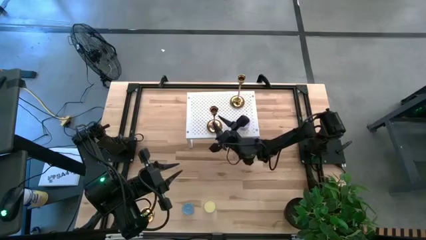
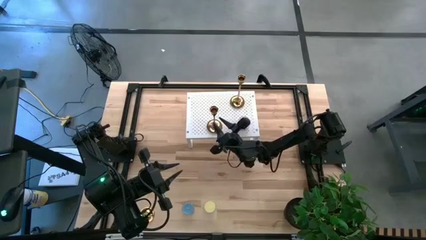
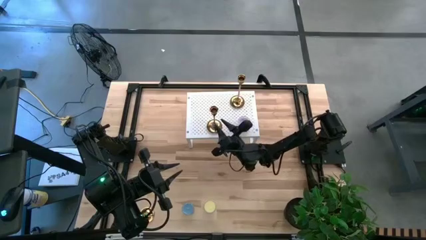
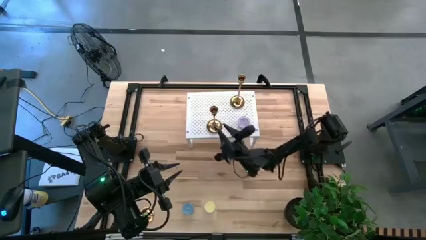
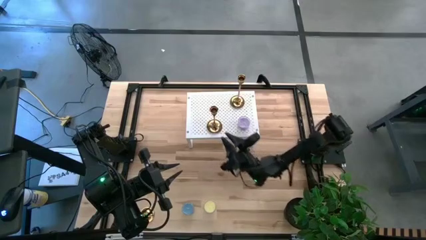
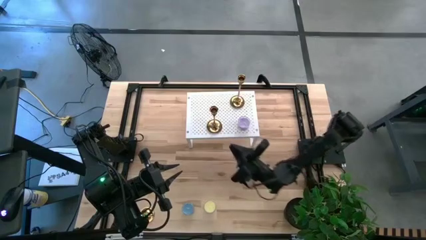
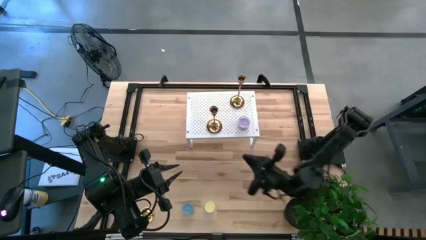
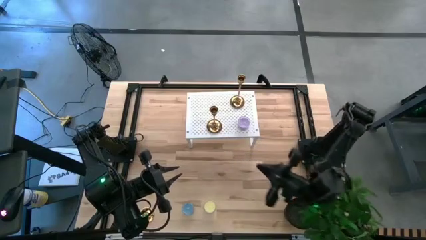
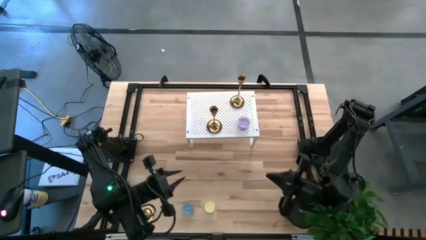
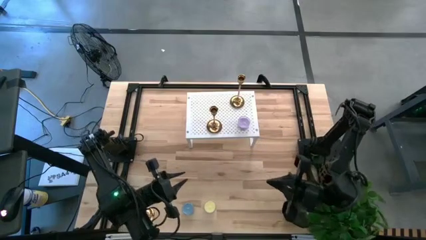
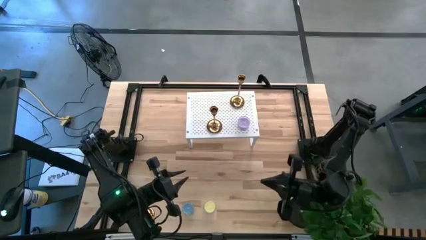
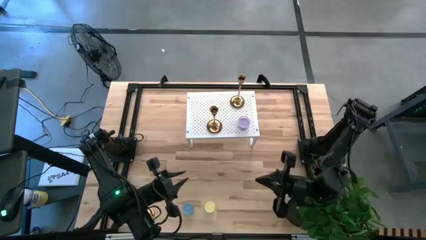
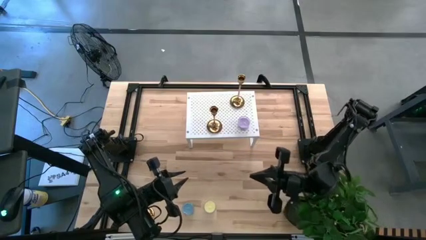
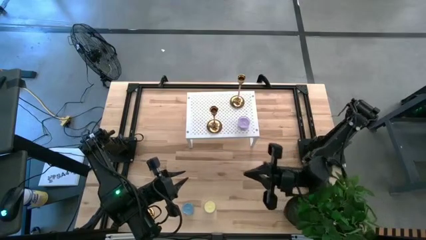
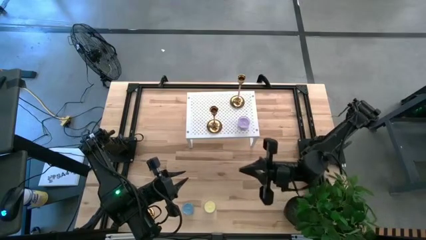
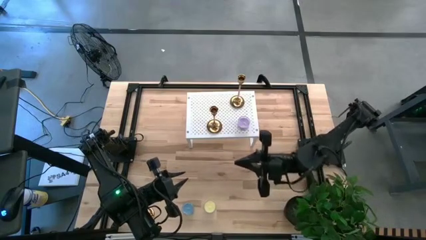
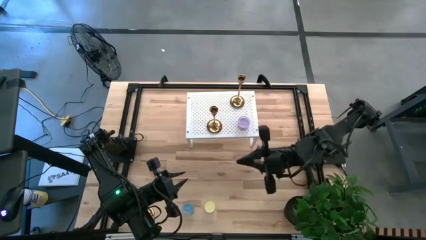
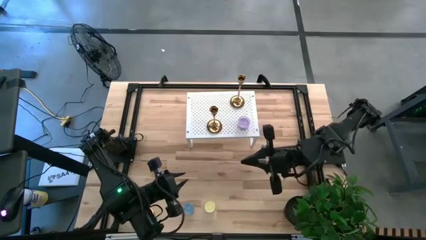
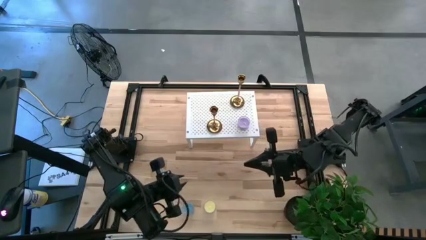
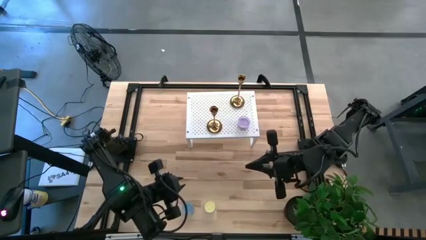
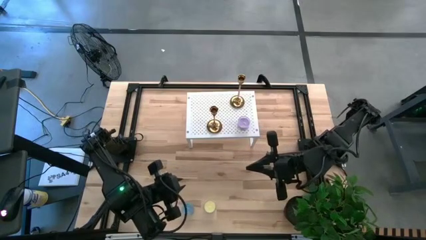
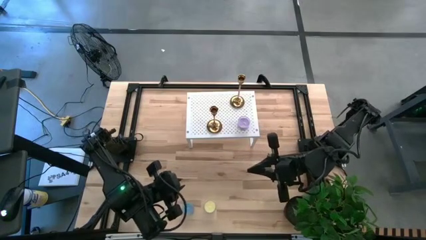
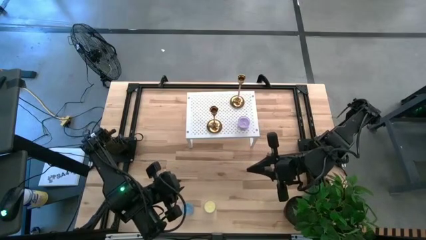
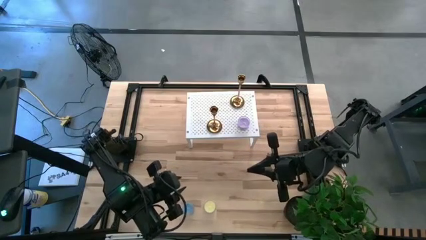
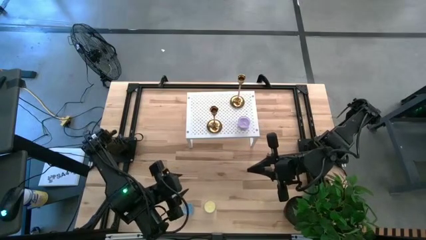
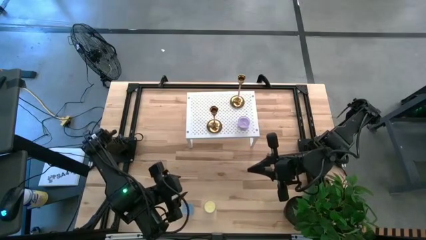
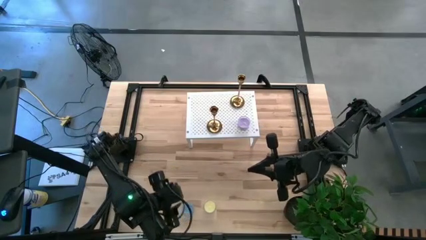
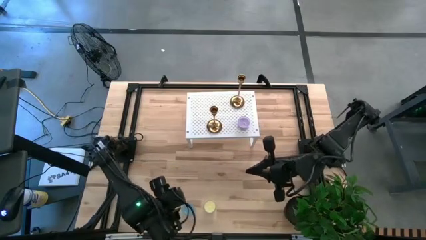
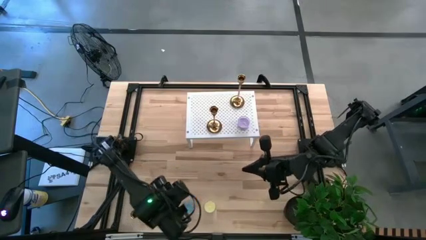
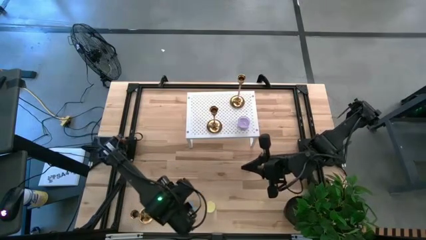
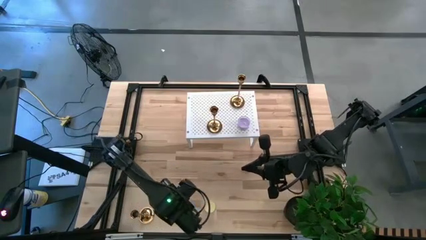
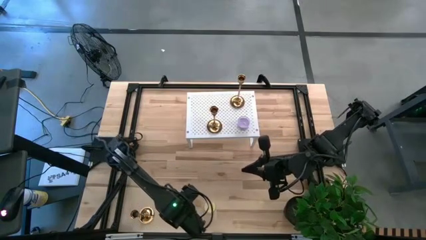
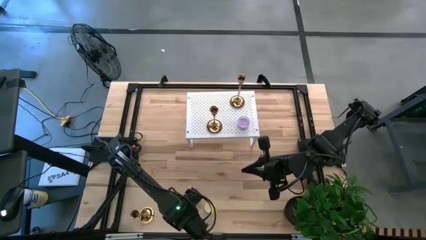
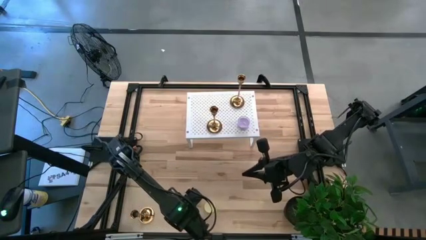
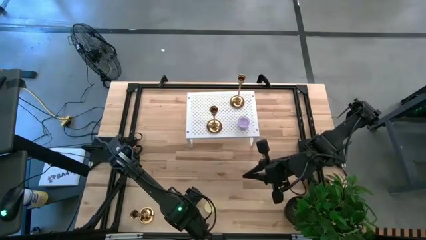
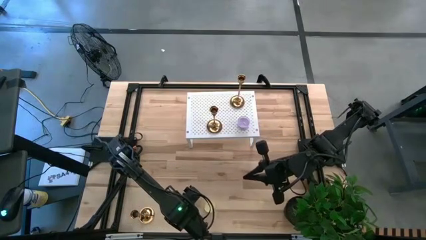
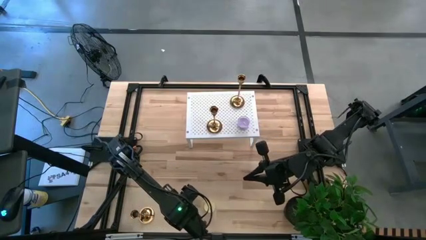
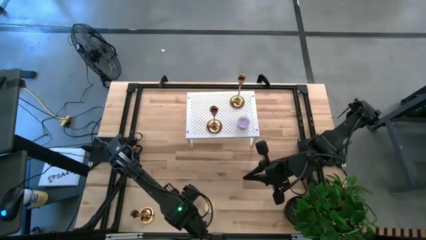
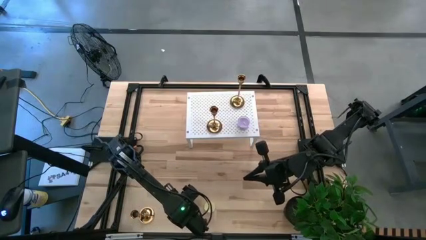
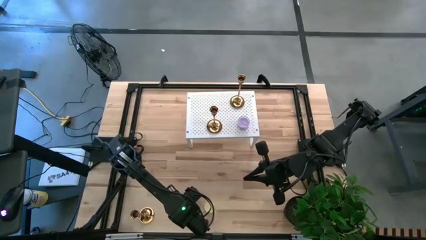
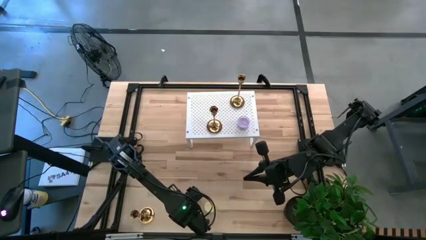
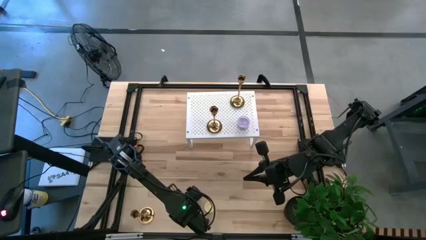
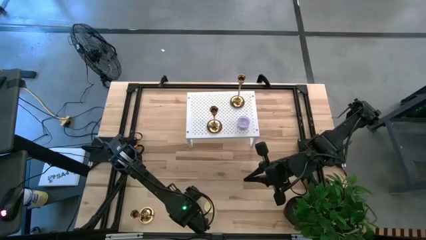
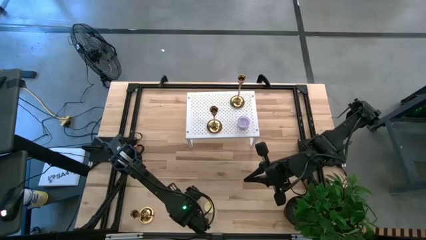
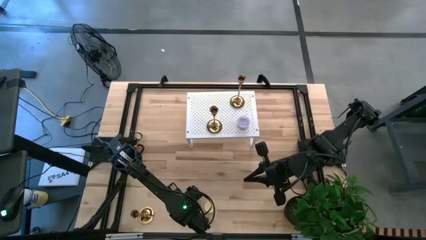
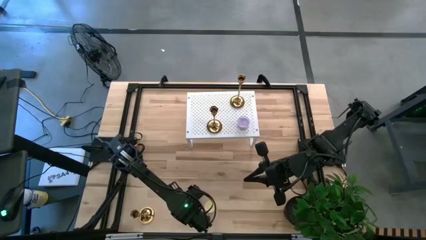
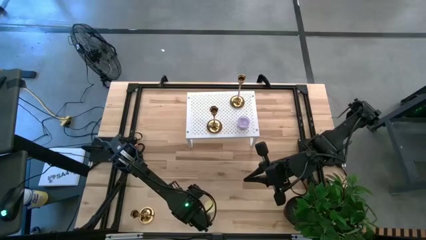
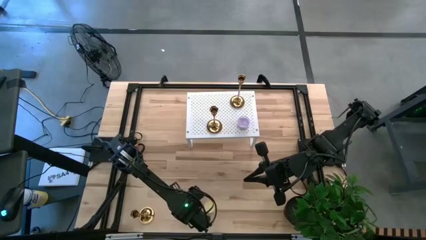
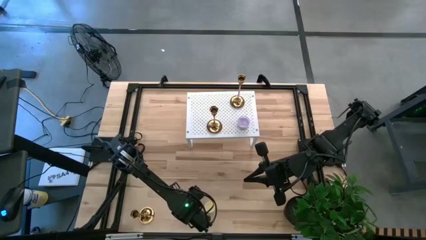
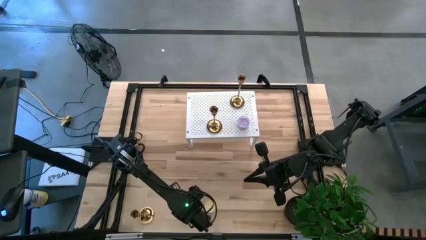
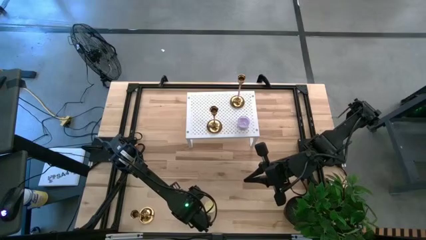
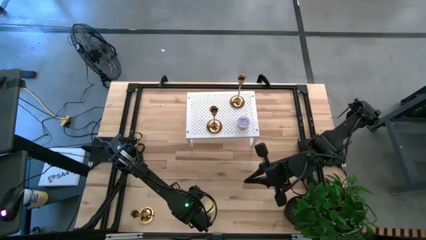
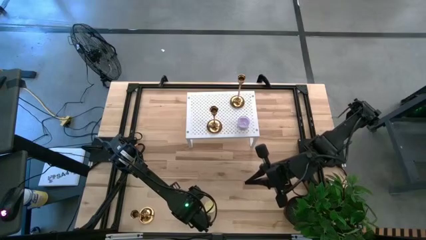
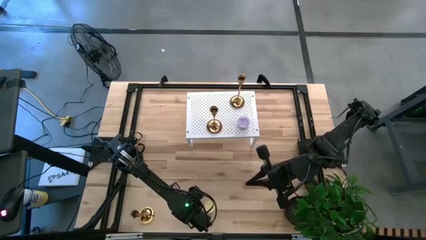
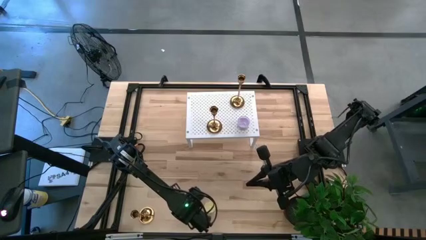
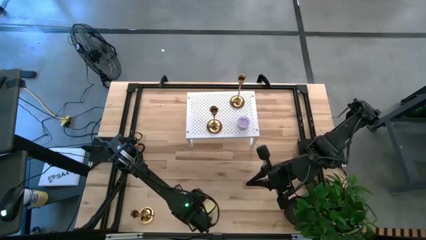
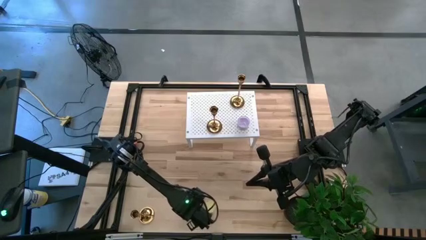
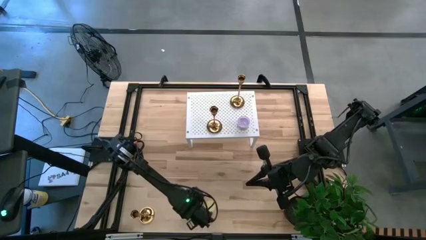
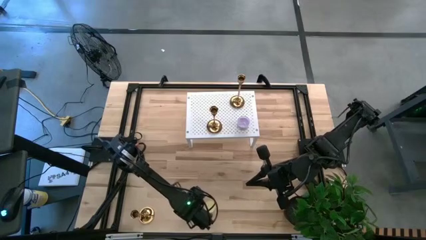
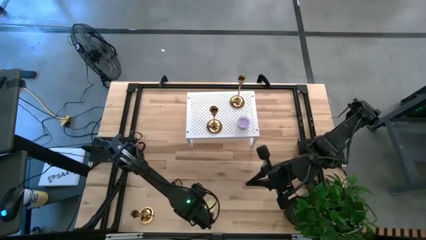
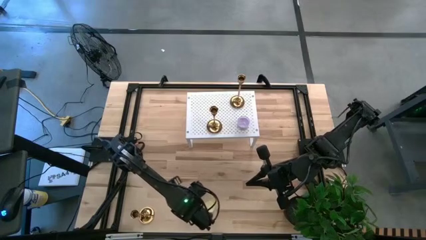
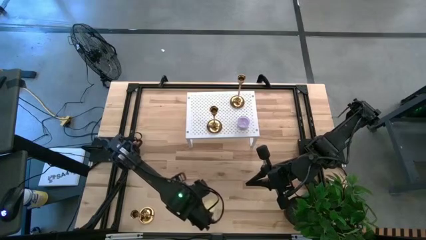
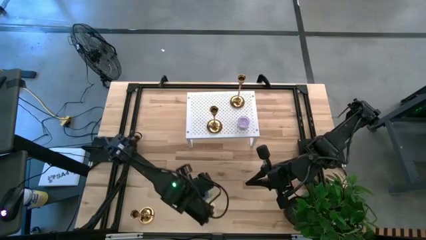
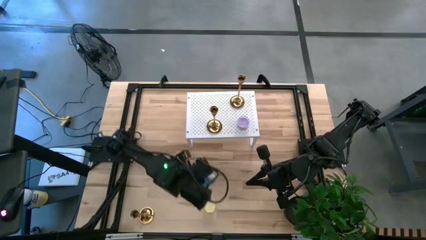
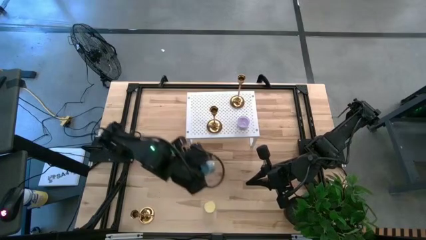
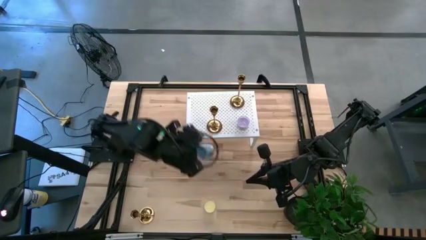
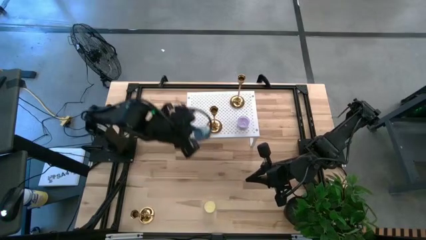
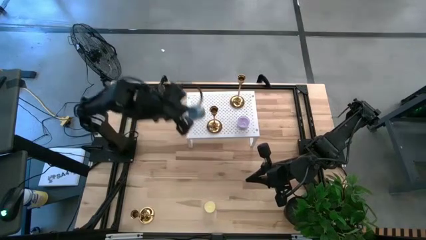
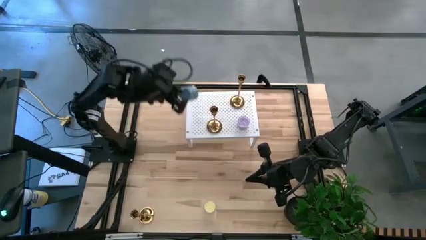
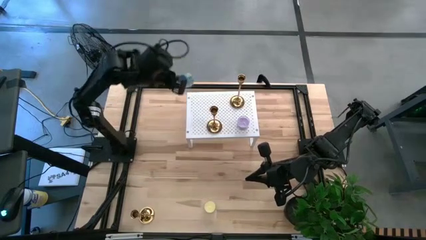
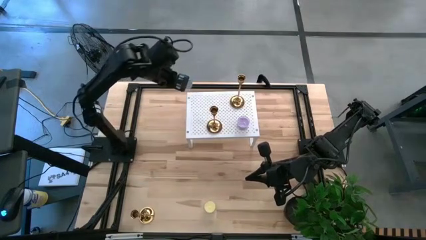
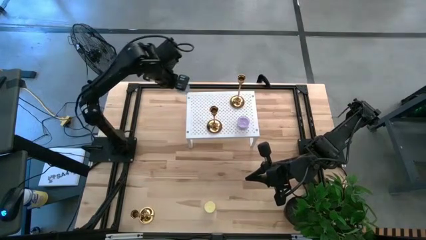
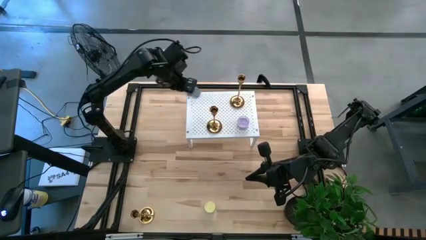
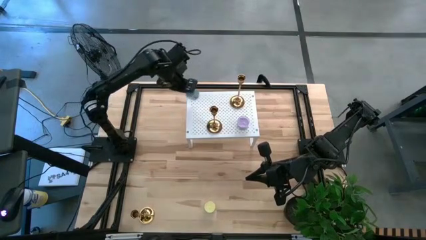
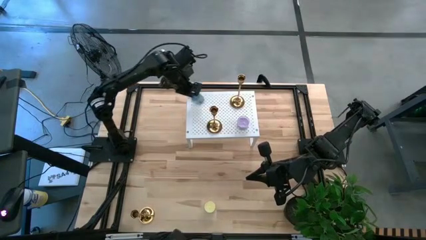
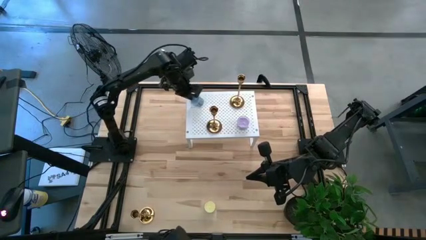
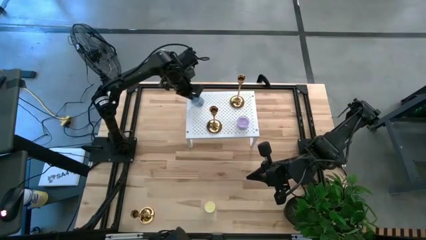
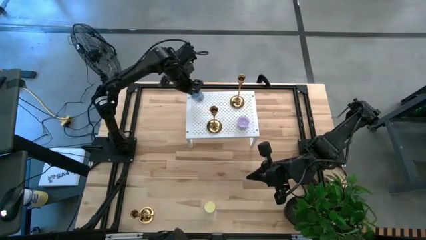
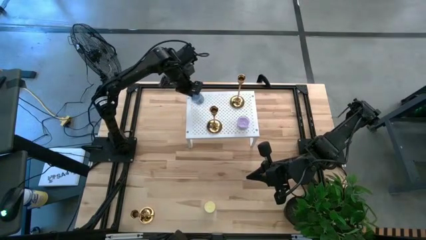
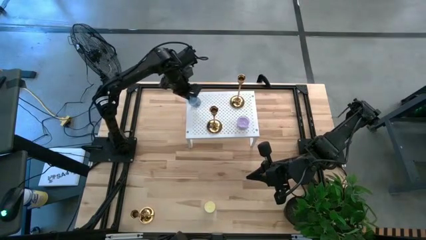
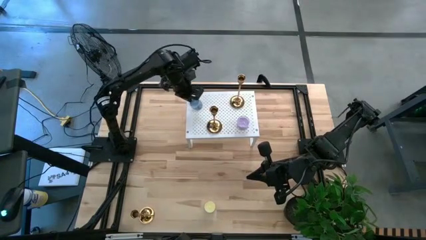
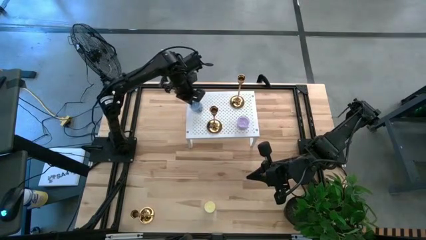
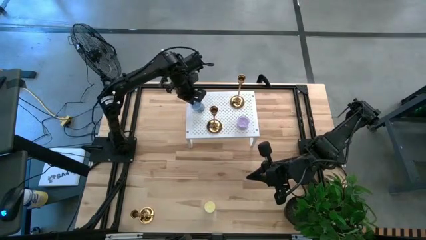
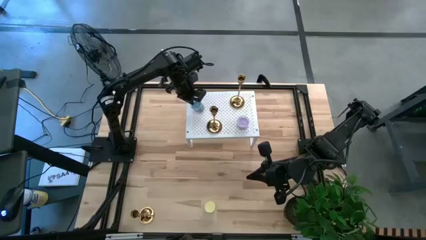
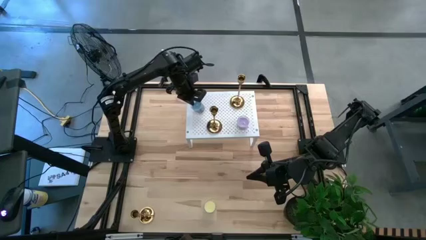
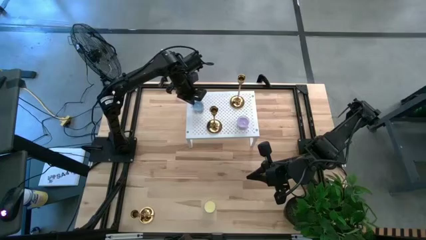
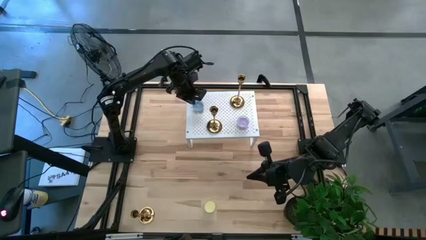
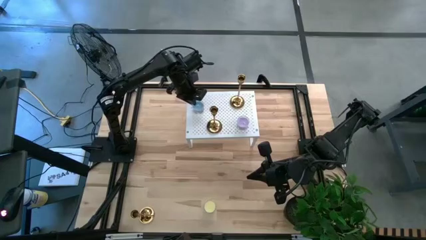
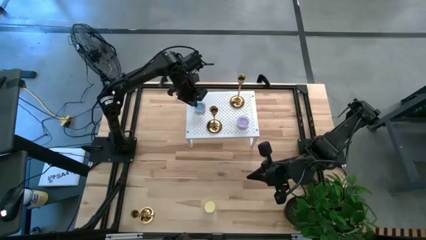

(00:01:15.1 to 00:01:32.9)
Task: Pick & Place candle stick holders
Put the blue scented candle on the shelf
